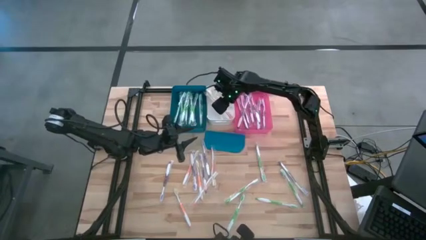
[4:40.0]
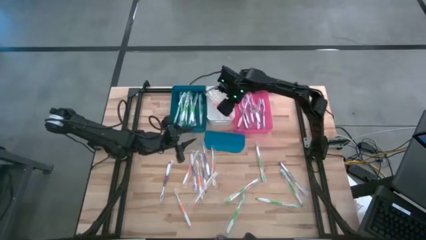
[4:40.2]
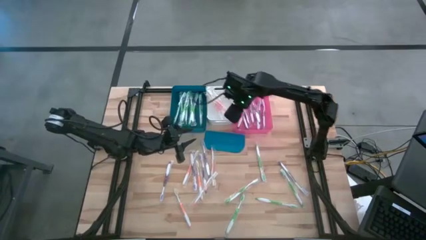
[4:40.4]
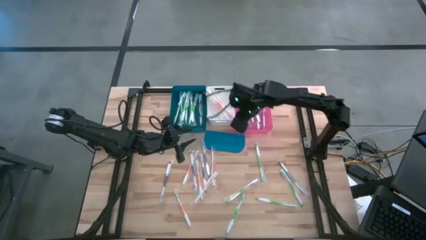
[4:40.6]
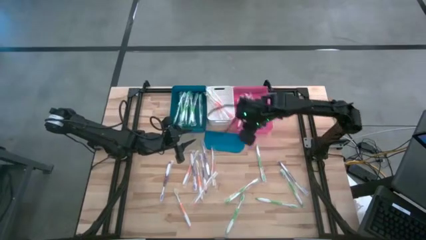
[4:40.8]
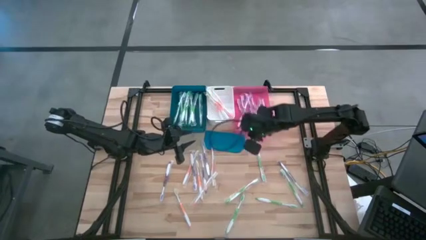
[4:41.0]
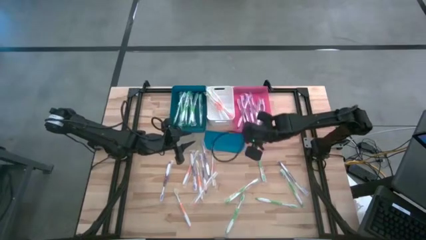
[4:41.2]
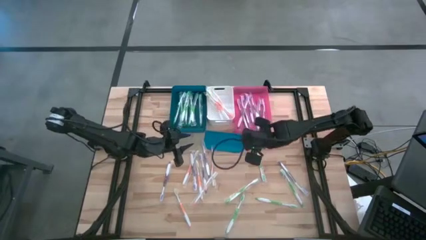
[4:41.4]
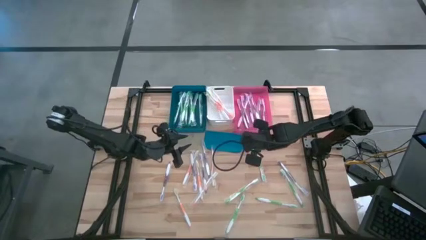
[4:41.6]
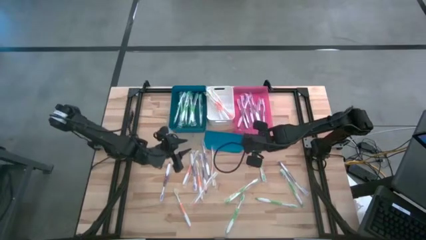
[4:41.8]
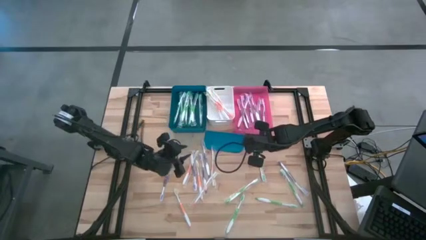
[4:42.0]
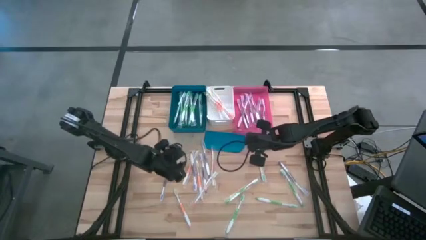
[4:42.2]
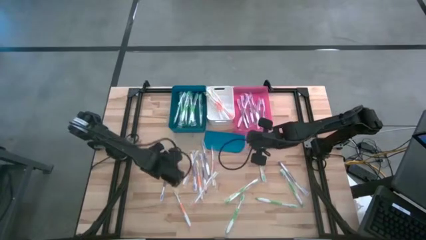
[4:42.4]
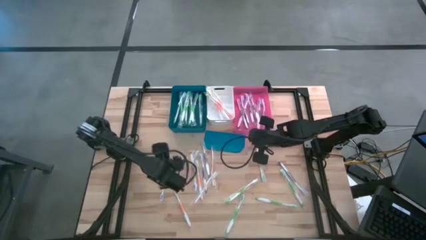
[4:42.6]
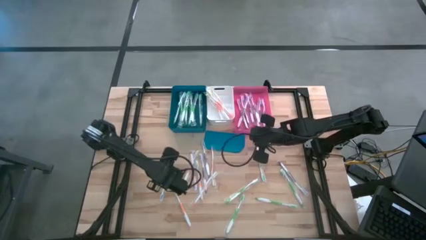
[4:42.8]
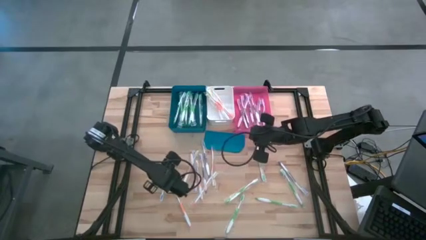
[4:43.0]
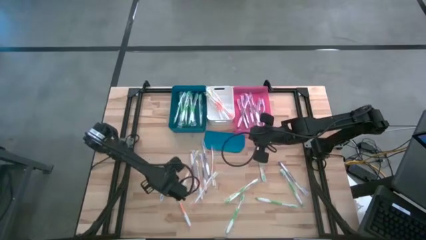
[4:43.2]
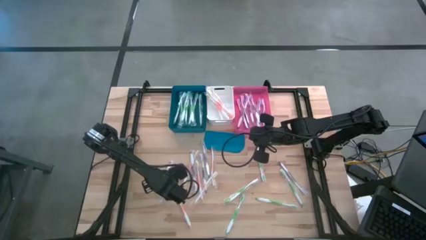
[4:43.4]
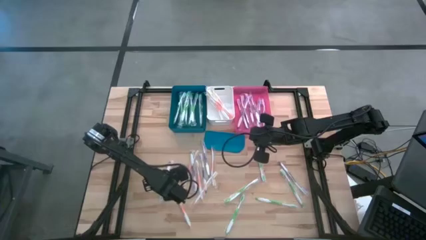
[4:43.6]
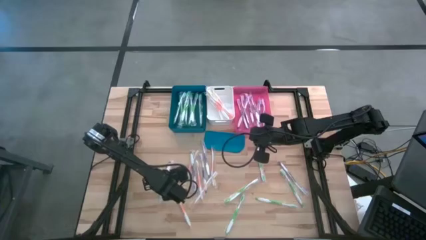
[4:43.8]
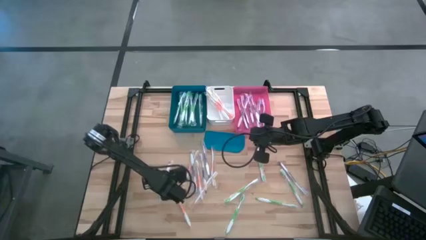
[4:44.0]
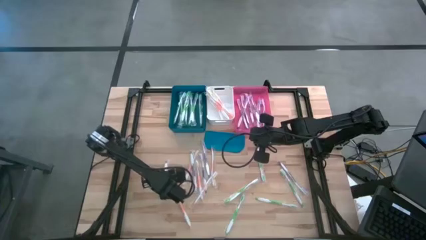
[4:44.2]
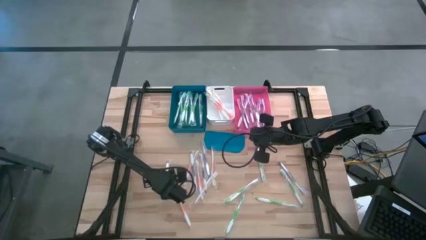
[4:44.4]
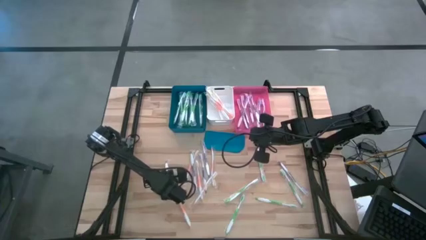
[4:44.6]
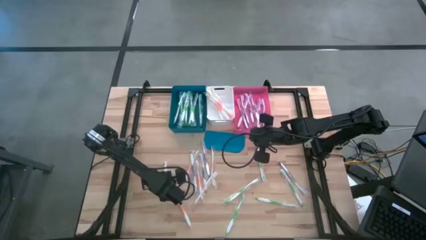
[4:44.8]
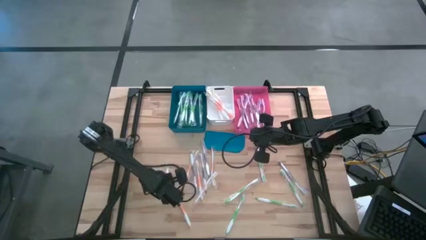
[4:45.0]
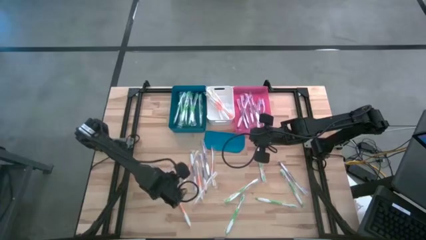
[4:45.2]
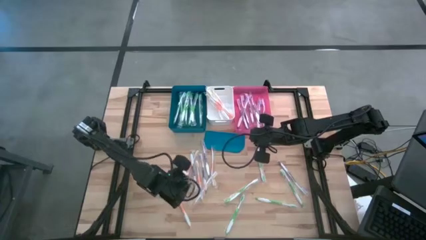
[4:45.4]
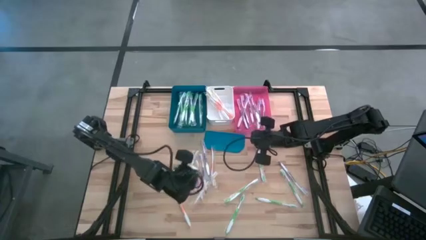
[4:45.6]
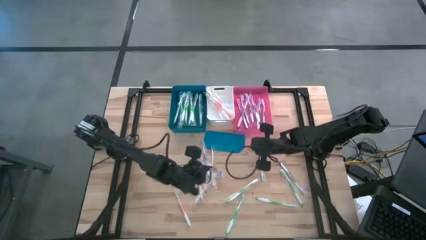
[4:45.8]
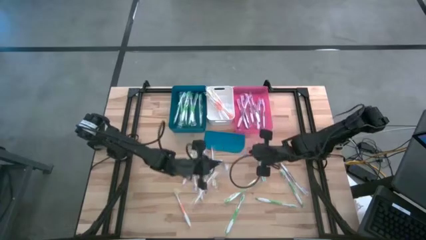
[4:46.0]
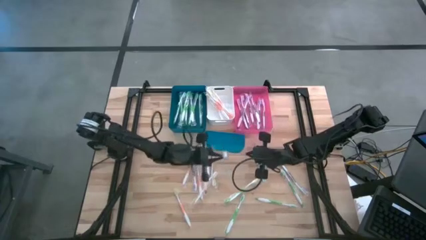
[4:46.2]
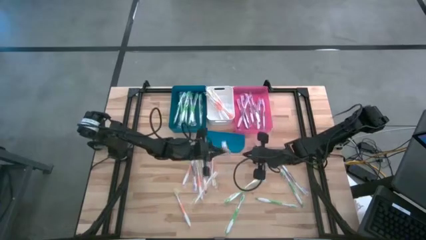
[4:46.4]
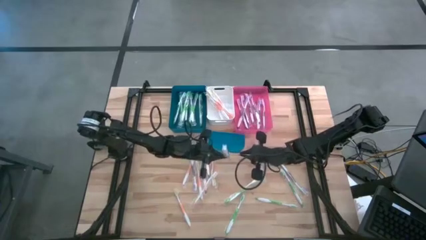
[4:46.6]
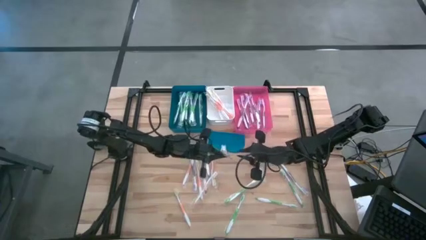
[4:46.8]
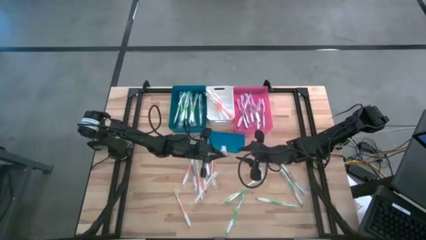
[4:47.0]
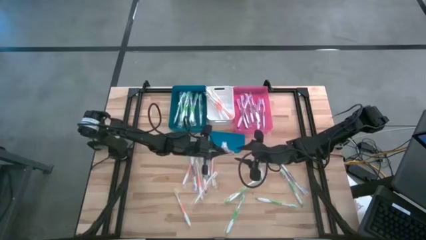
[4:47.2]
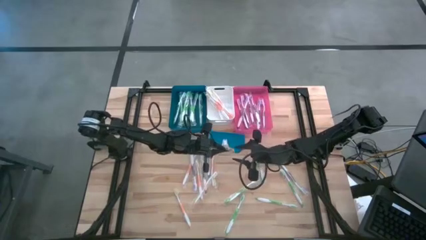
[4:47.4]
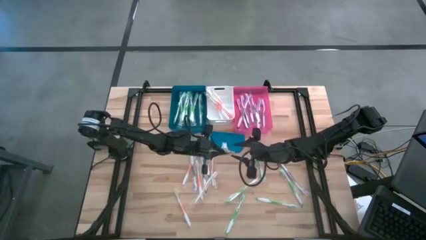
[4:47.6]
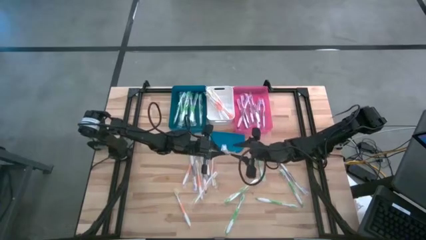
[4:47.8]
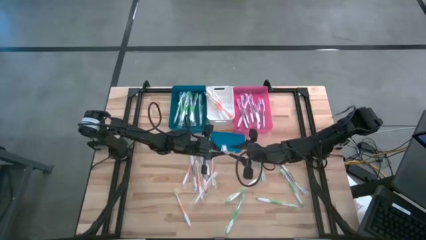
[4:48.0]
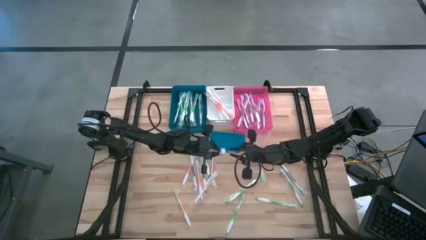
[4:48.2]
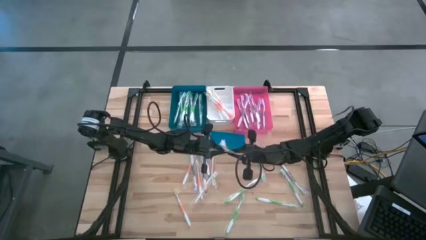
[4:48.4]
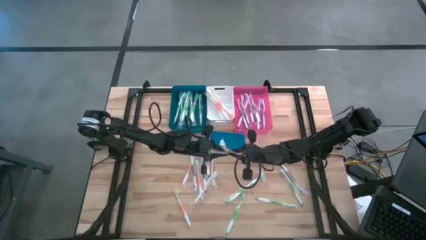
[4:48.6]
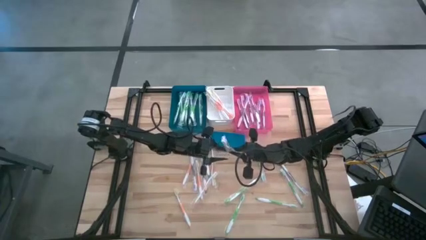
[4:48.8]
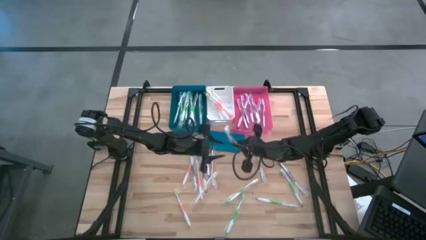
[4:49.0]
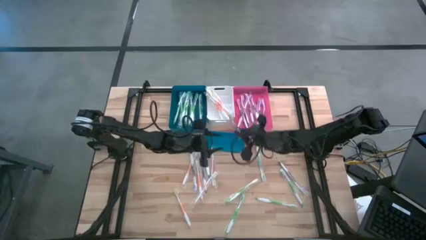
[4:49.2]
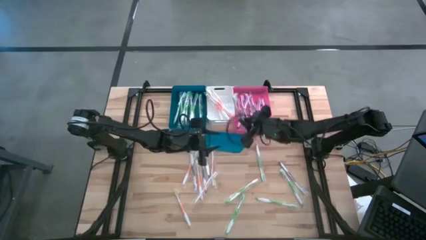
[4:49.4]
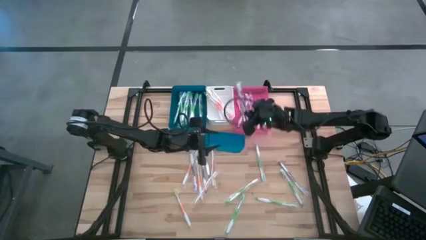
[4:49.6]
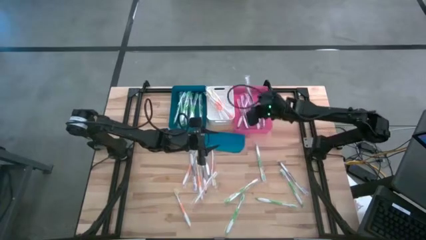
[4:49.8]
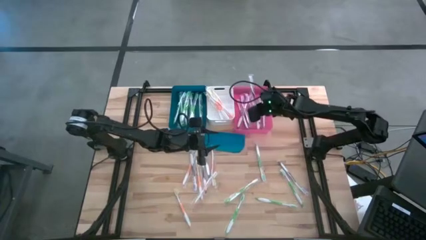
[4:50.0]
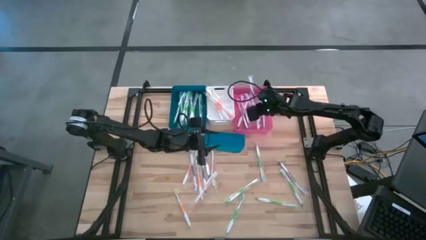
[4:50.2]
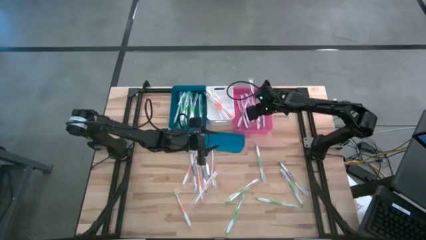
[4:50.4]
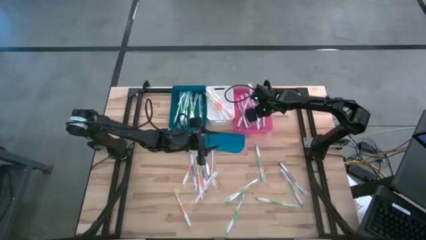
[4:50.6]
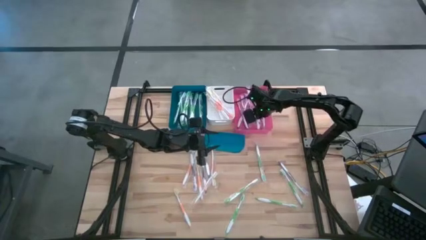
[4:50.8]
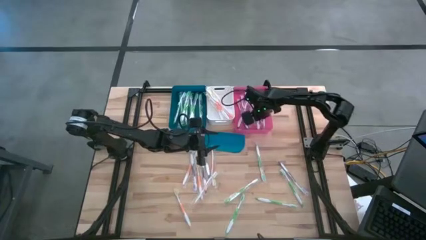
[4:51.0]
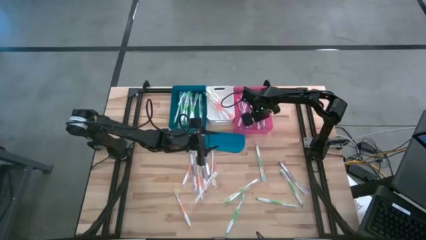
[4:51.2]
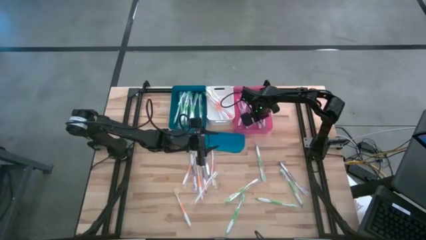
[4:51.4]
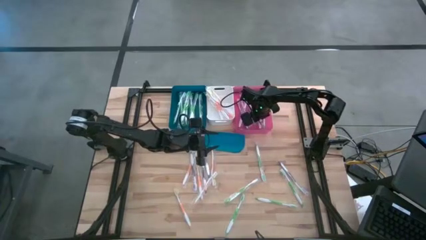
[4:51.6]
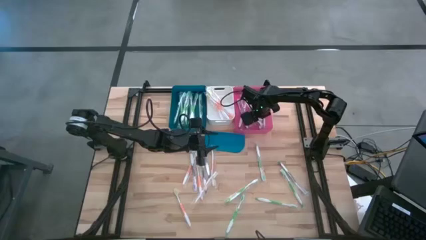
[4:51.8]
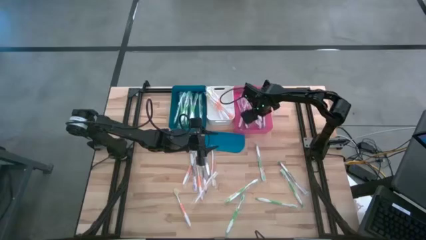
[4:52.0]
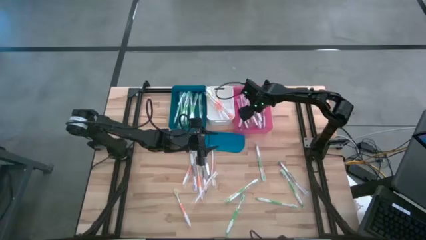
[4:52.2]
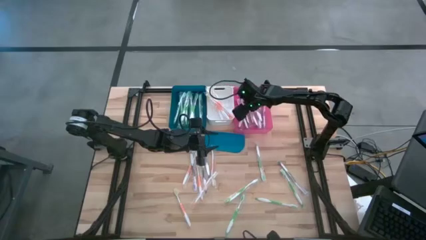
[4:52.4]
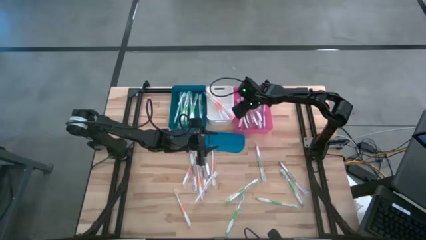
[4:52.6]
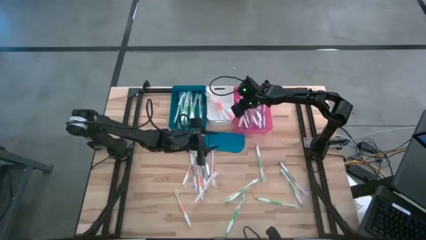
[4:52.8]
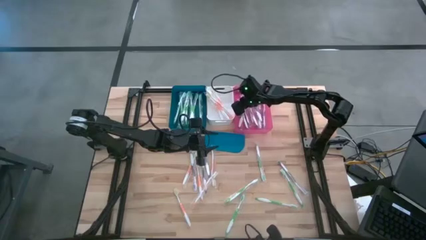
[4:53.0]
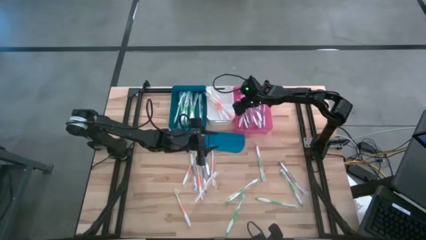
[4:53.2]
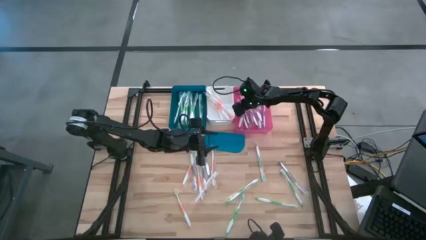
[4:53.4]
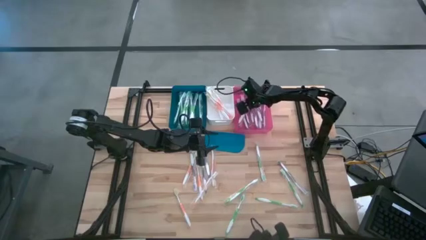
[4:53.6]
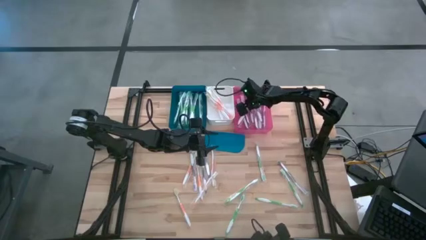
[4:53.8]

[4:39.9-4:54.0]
Task: Pick & Place Toothbrushes
Put the purple toothbrush into the pink bin
